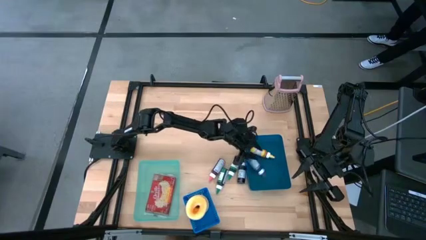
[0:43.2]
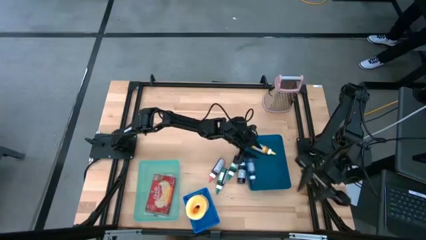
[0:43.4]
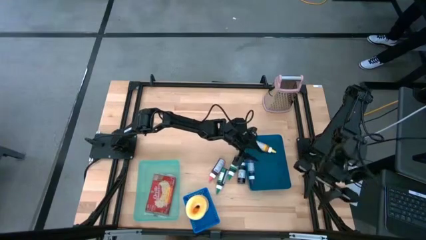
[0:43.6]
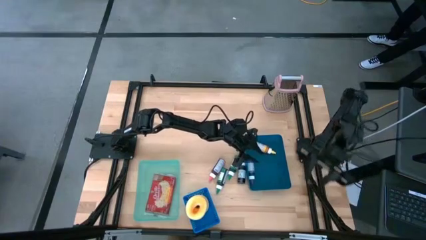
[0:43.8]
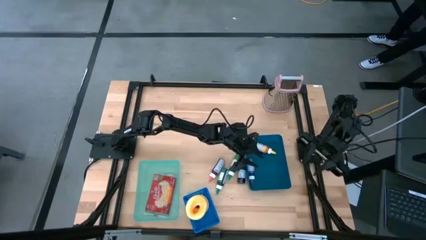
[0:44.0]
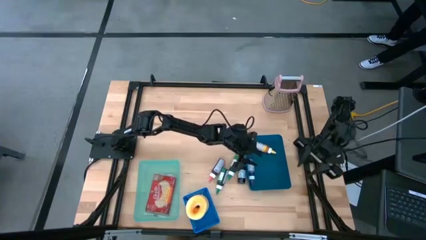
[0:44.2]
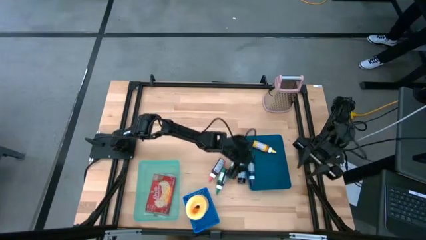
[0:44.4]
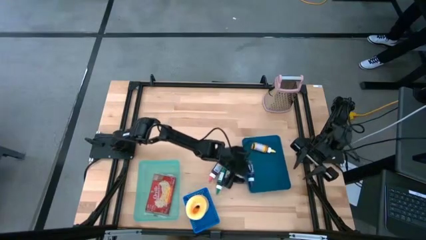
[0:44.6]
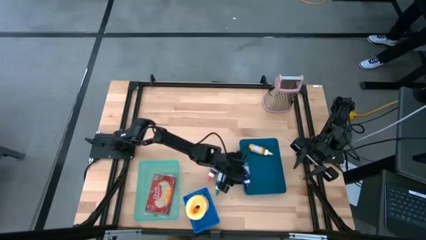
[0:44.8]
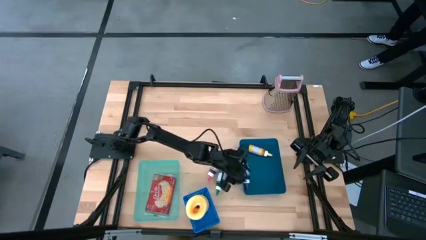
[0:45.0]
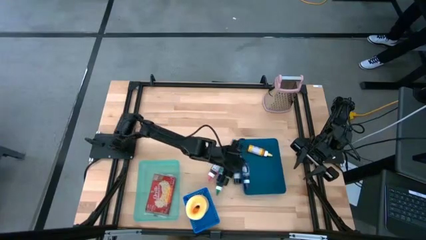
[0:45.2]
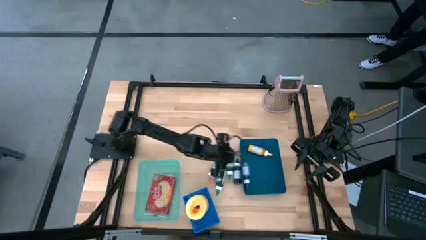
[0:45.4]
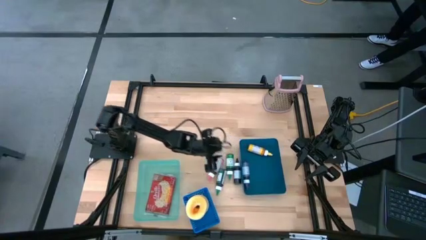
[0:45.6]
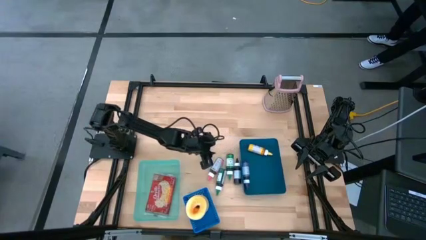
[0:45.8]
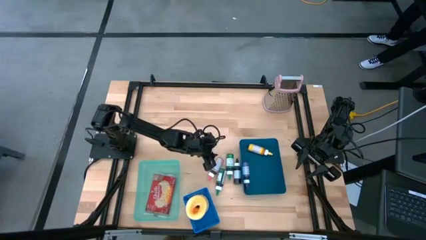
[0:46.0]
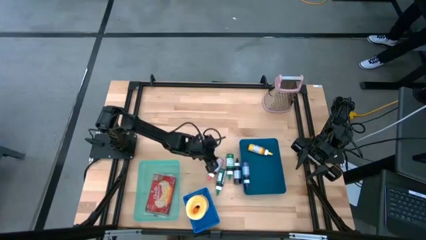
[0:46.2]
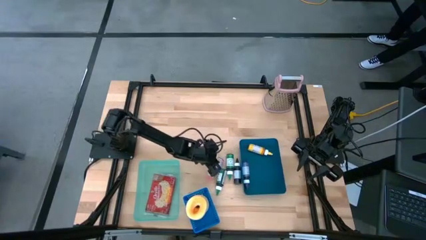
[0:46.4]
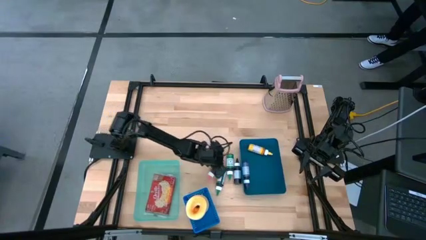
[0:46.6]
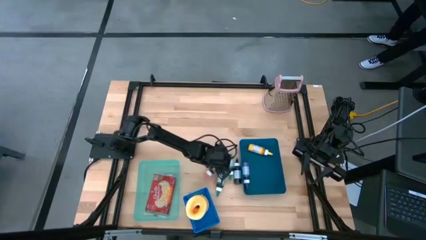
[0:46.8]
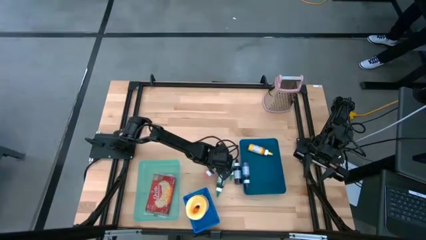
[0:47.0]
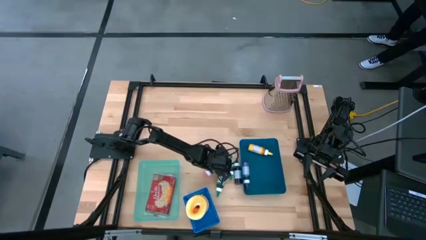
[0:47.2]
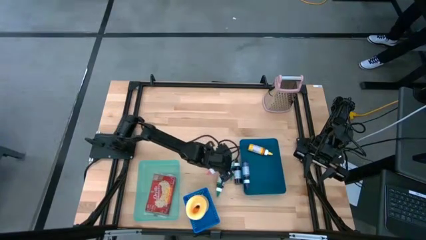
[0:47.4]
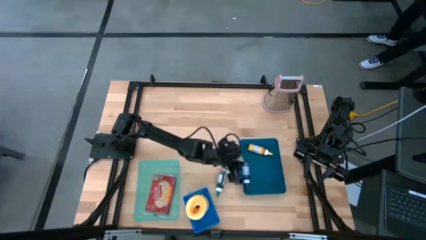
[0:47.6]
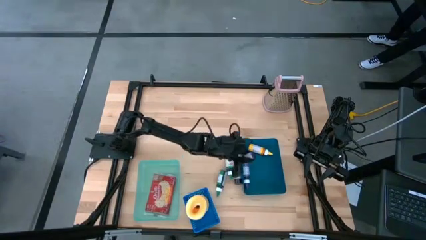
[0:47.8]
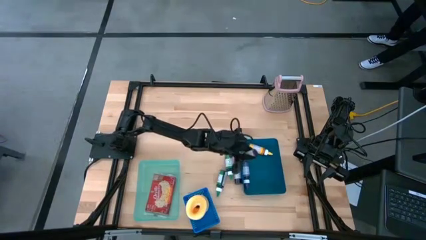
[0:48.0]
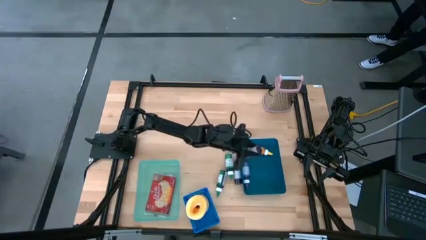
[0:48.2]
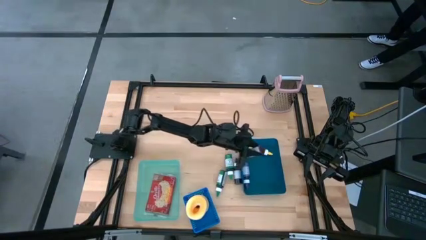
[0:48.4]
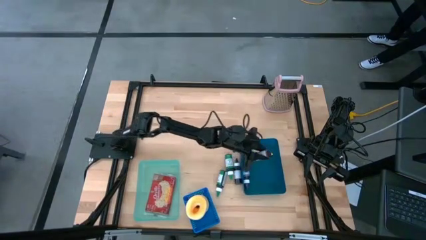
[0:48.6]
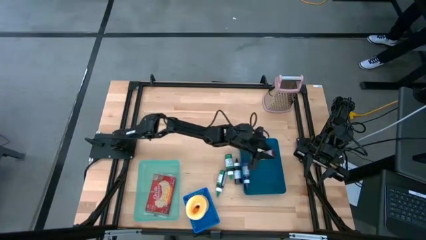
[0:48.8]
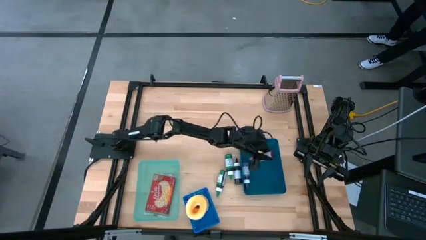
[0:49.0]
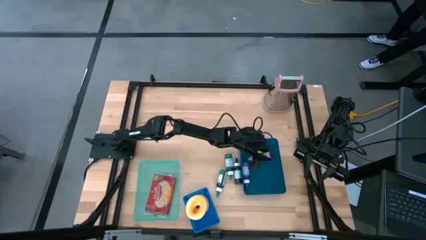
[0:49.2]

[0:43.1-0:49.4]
Put the pink food coloring bottle into the dark blue bin

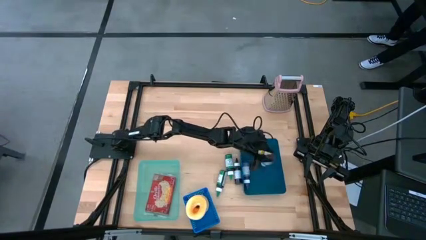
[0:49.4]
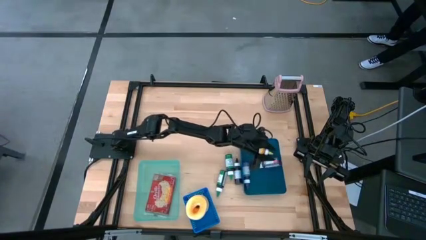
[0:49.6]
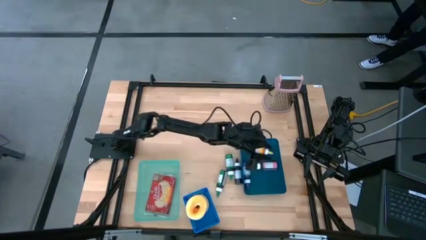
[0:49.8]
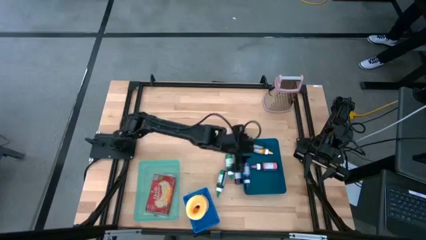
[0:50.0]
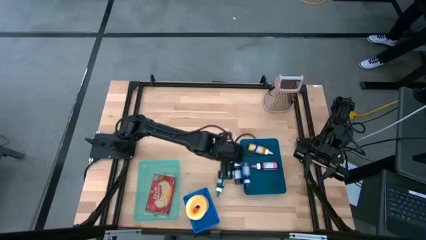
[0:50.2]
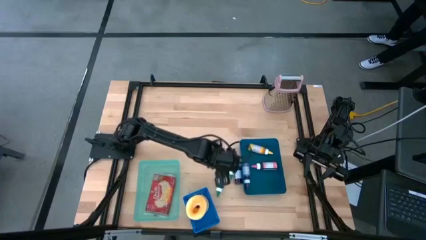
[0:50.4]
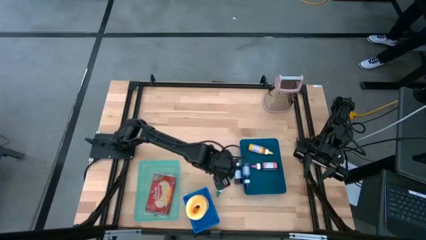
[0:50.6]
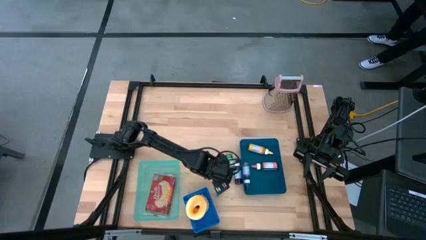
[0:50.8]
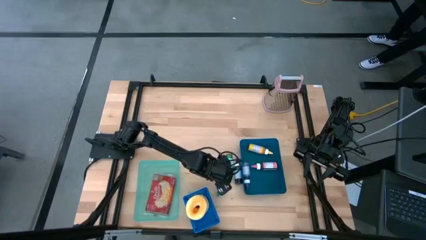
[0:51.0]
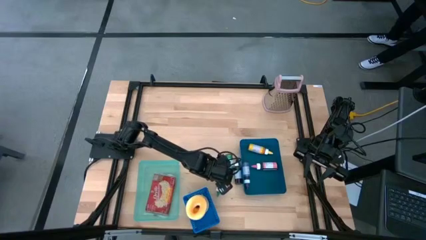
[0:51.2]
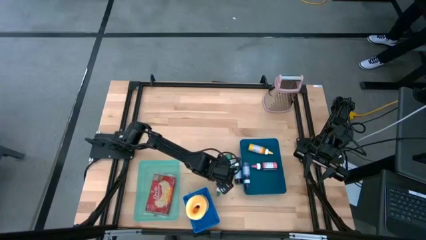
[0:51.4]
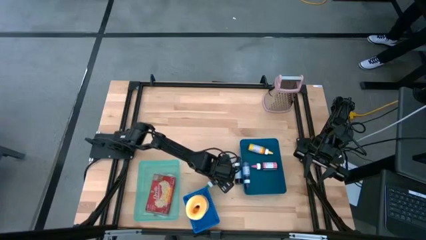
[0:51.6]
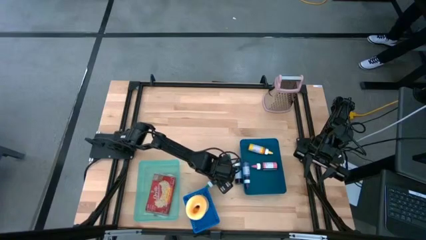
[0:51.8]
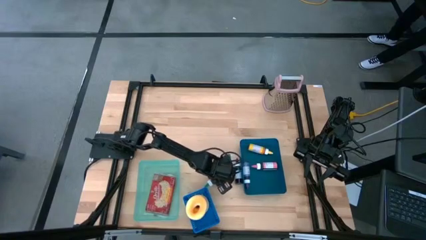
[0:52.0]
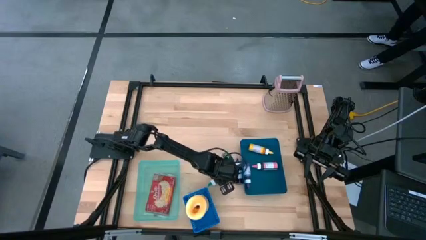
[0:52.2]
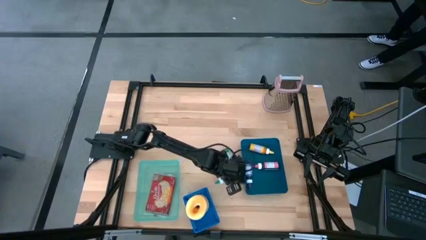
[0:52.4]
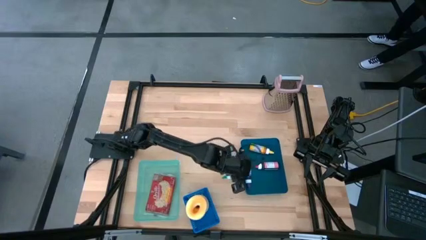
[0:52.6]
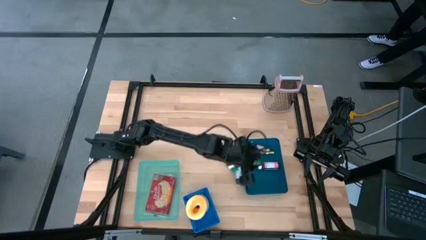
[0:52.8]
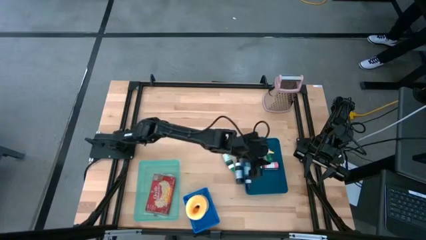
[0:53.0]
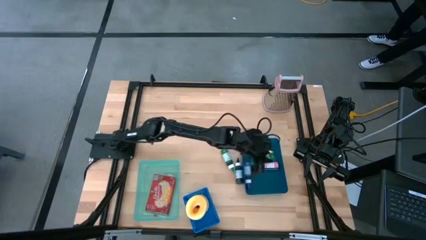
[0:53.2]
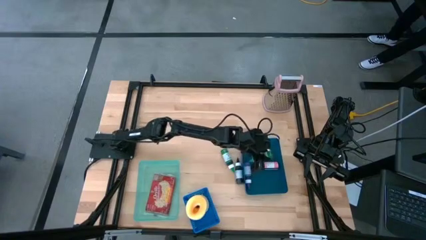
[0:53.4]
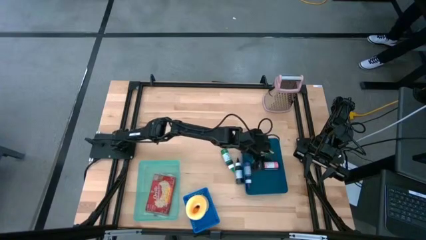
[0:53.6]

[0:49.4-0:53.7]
Put the left green food coloring bottle into the dark blue bin

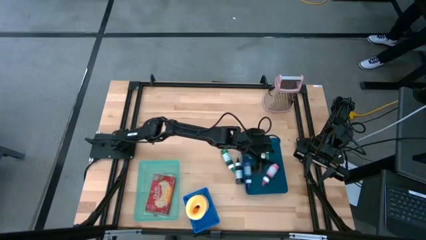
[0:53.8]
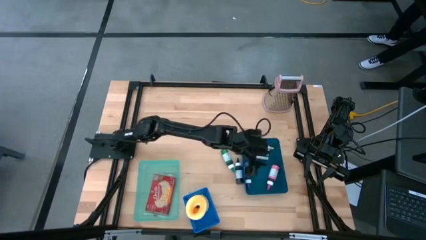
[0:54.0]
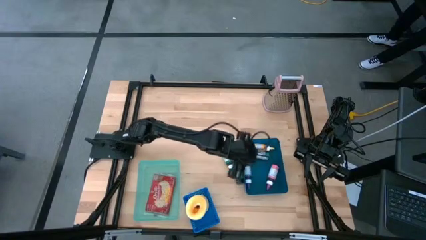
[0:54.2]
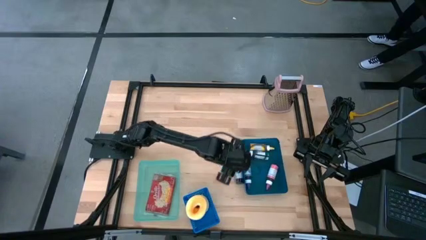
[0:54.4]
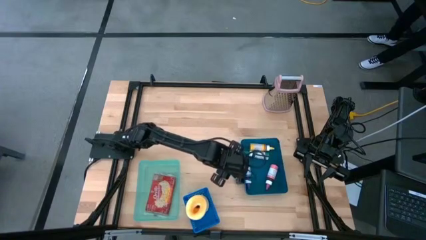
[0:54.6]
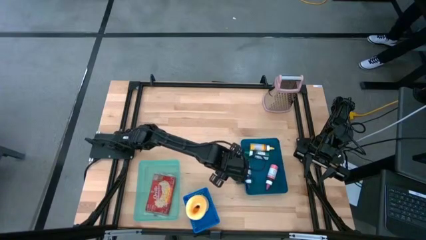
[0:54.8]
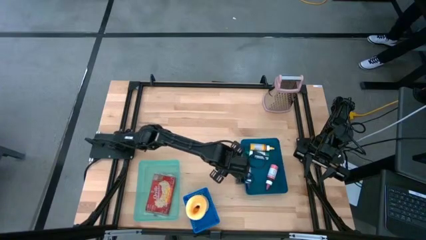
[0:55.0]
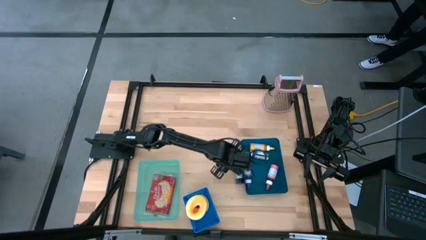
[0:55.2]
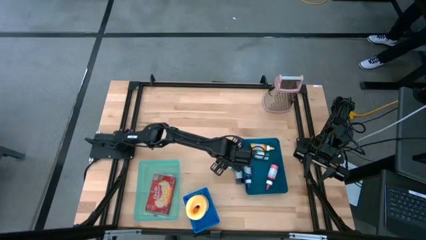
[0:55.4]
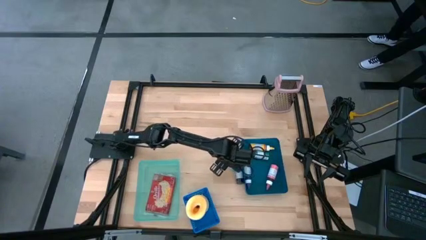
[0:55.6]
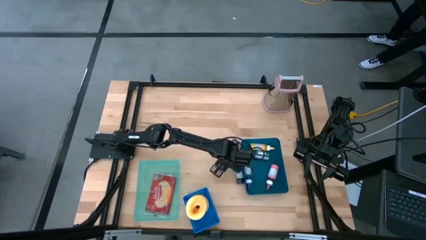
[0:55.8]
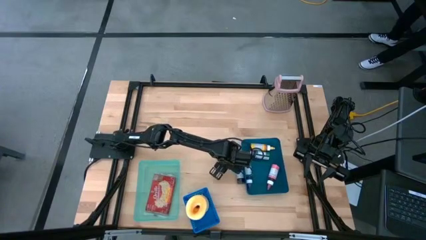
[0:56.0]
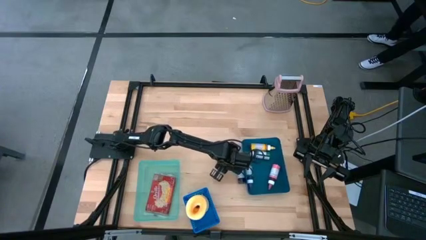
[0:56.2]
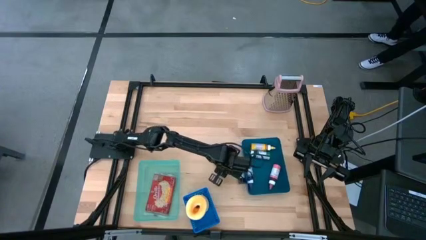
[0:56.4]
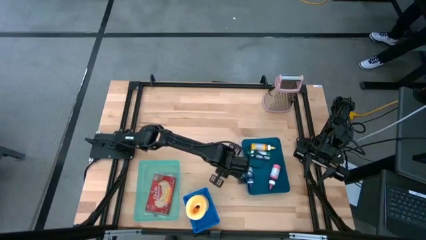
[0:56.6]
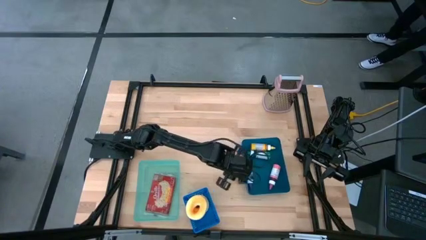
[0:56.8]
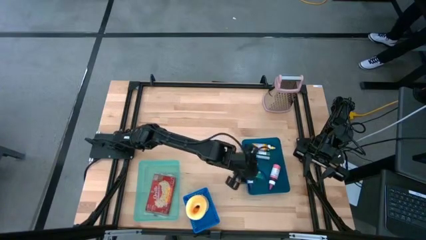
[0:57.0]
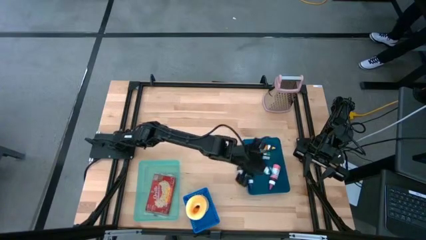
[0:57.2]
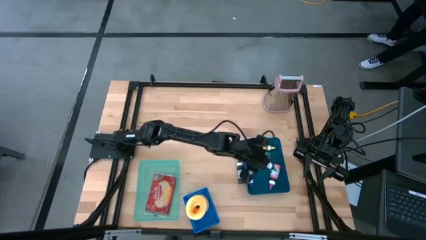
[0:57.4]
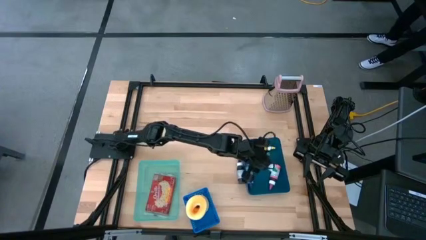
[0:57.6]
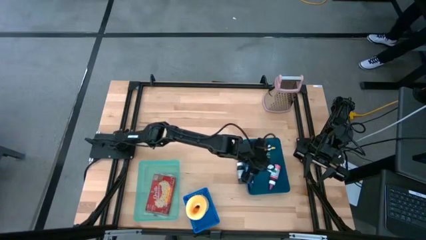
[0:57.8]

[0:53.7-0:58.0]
Put the green food coloring bottle into the dark blue bin
